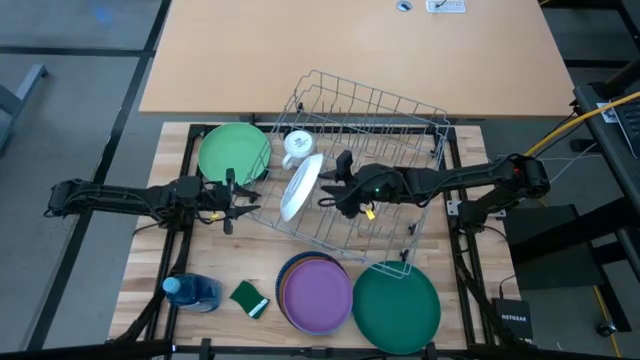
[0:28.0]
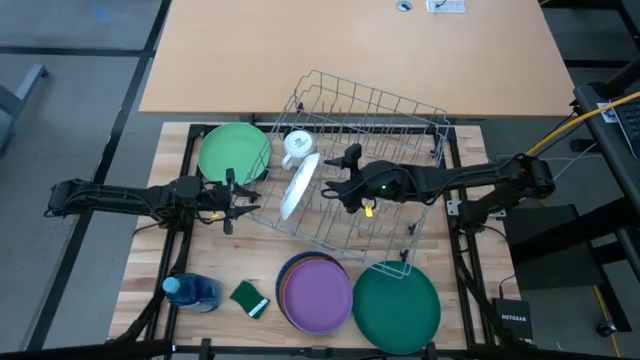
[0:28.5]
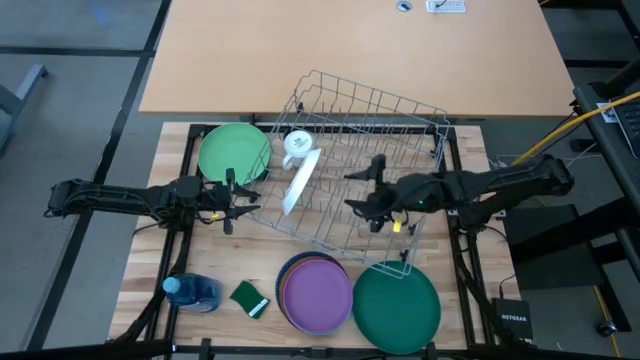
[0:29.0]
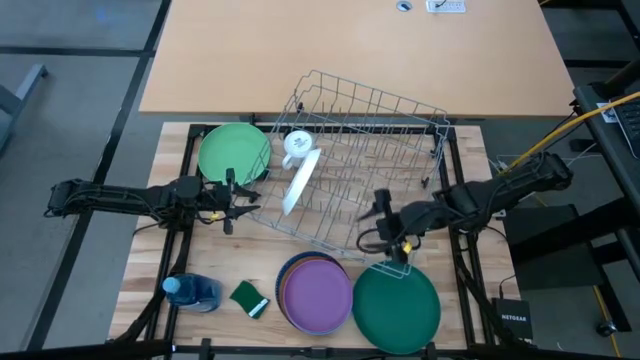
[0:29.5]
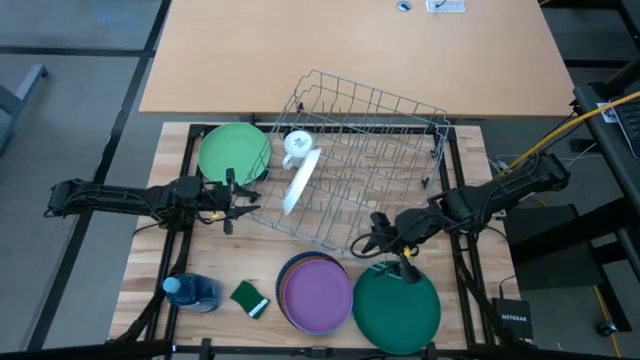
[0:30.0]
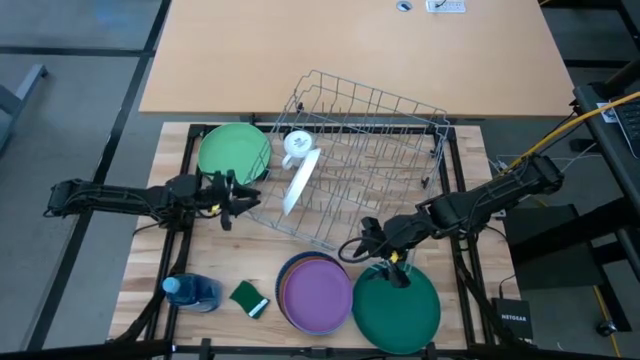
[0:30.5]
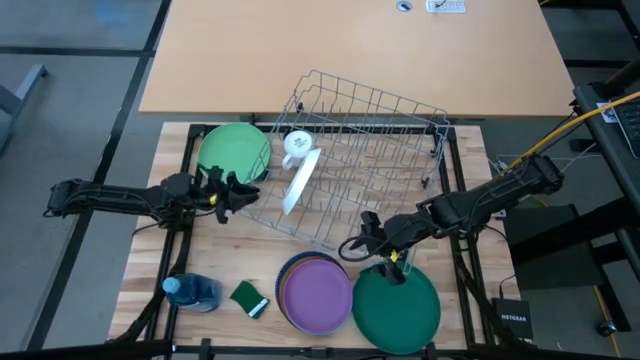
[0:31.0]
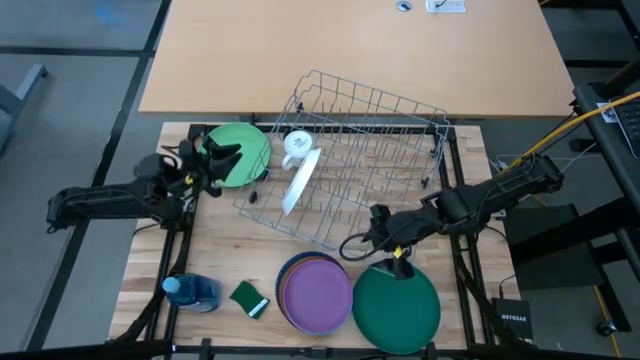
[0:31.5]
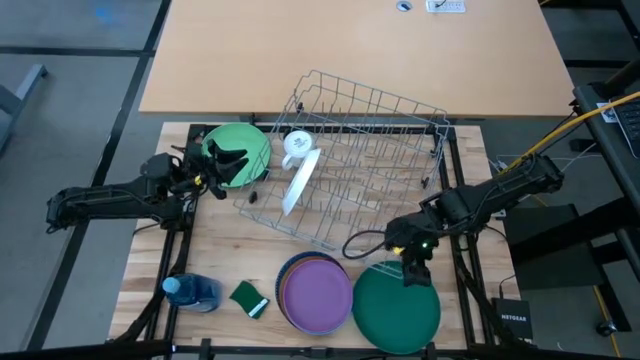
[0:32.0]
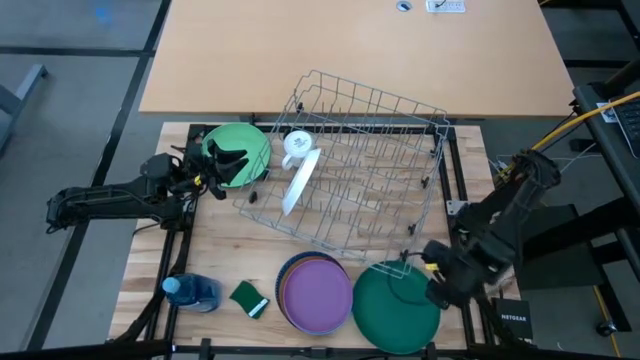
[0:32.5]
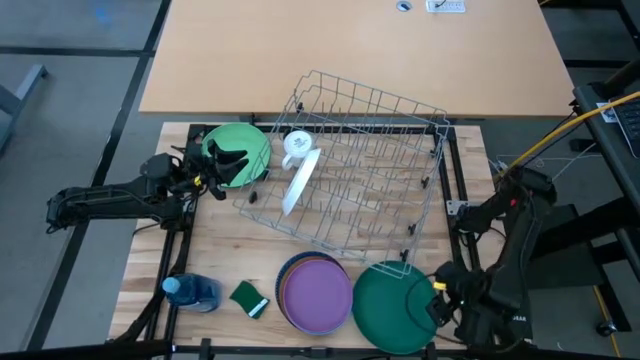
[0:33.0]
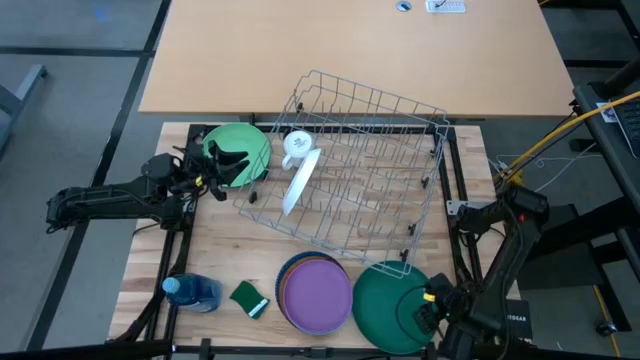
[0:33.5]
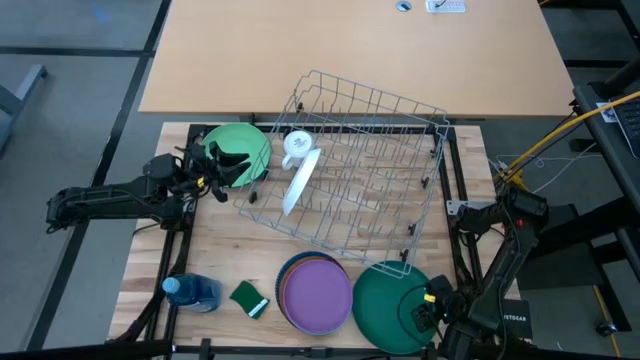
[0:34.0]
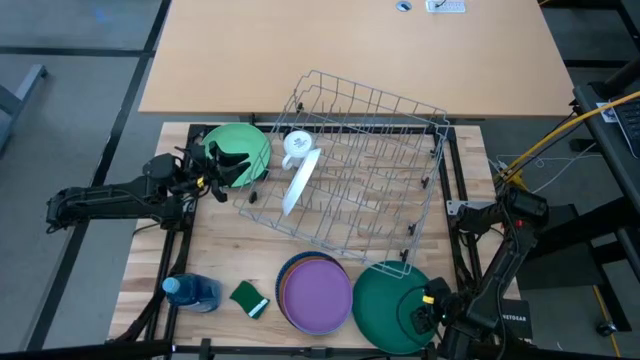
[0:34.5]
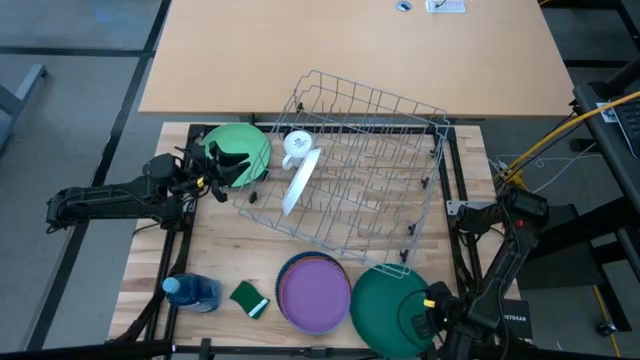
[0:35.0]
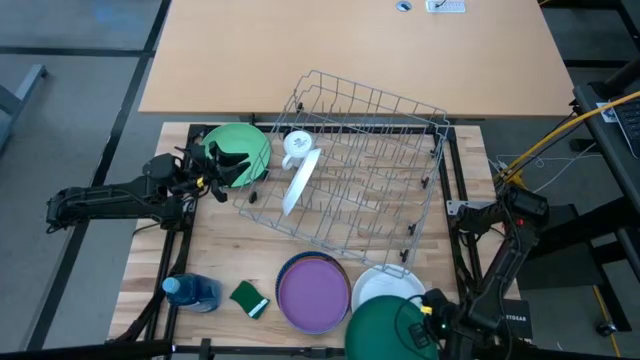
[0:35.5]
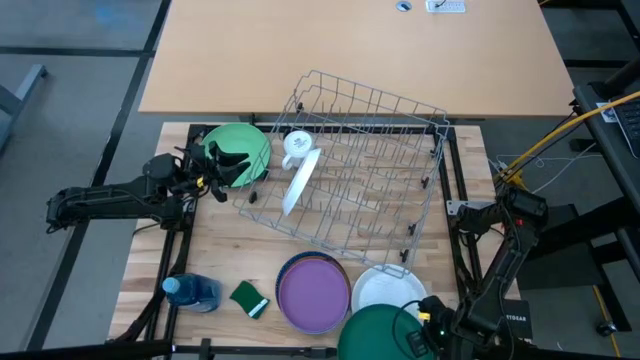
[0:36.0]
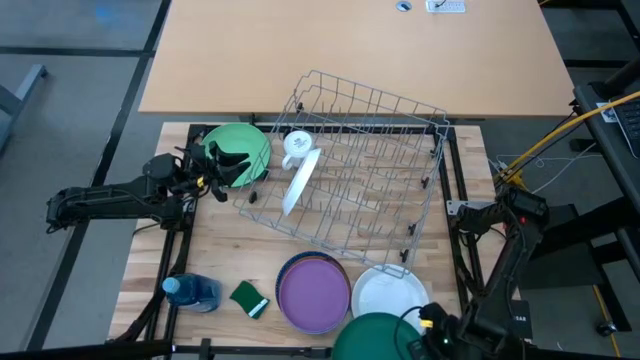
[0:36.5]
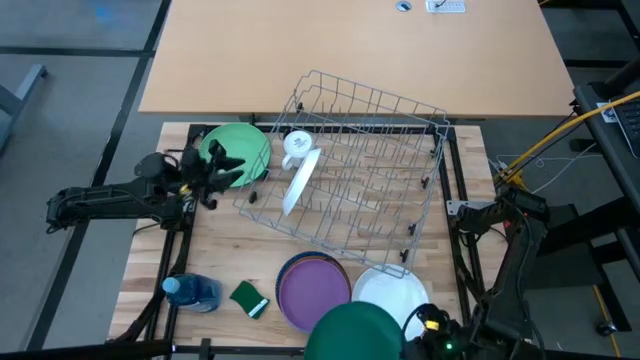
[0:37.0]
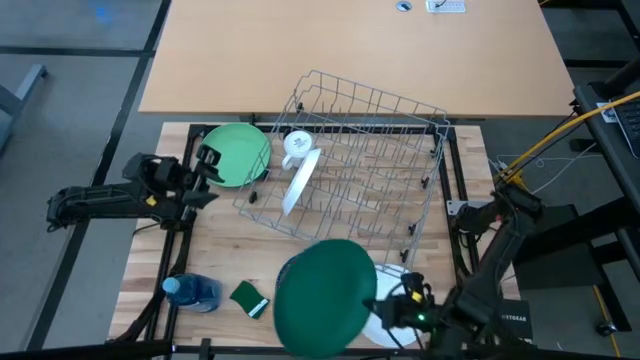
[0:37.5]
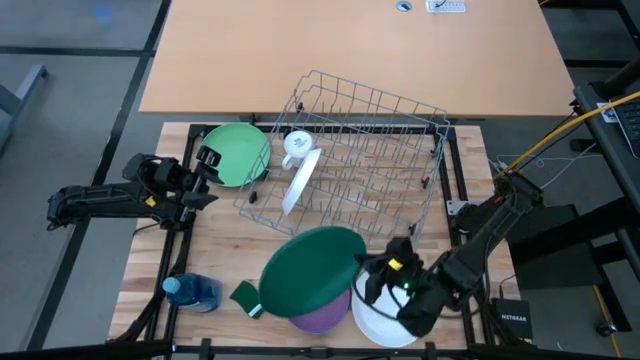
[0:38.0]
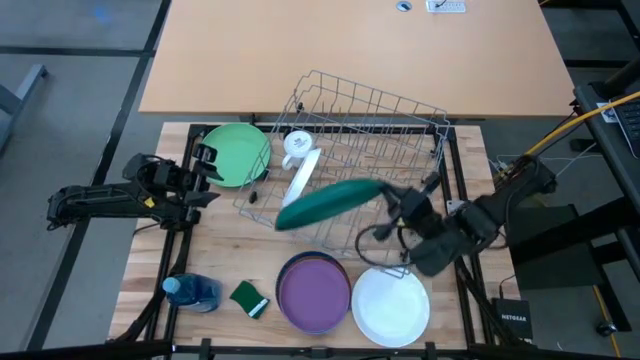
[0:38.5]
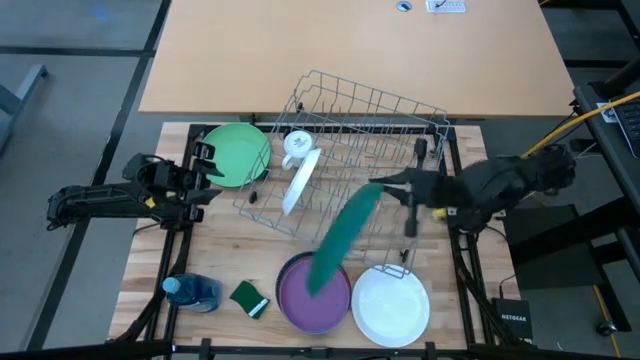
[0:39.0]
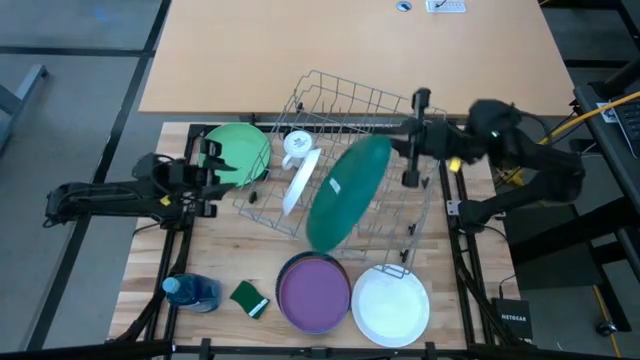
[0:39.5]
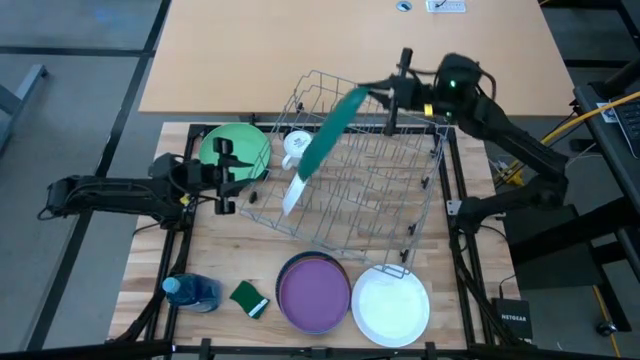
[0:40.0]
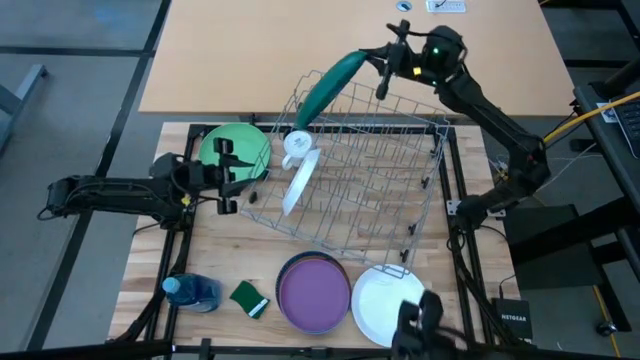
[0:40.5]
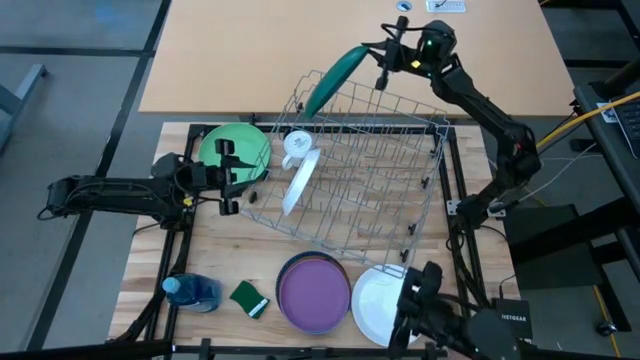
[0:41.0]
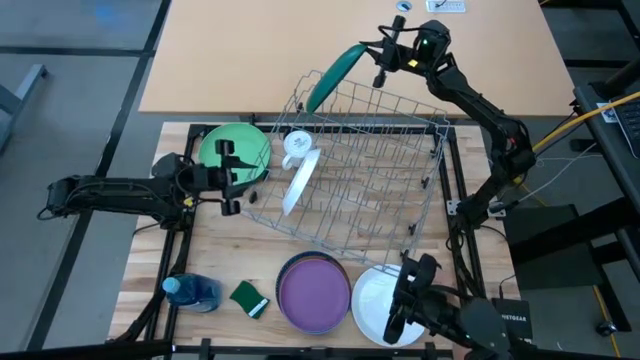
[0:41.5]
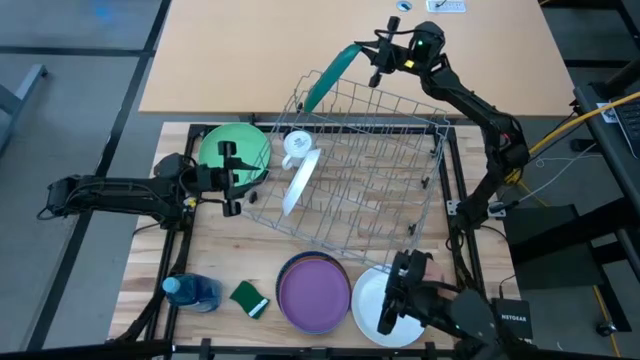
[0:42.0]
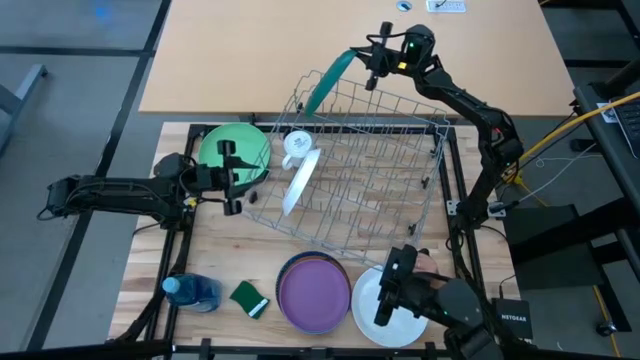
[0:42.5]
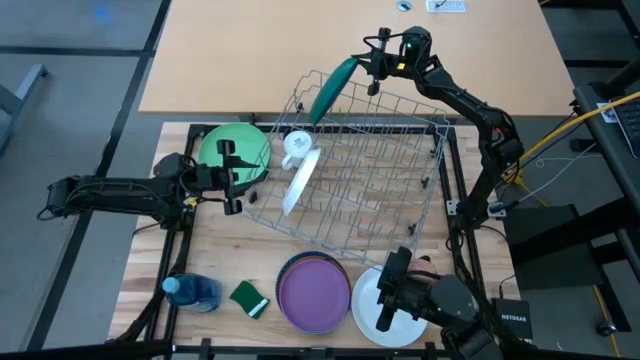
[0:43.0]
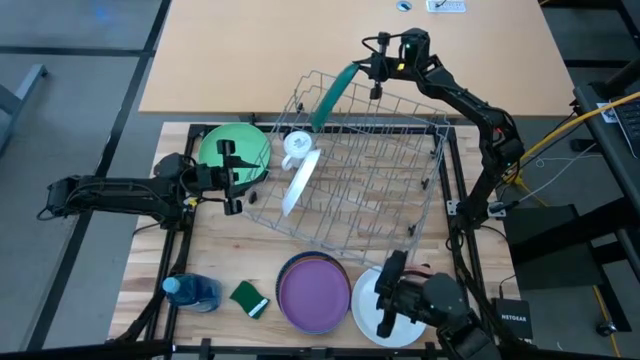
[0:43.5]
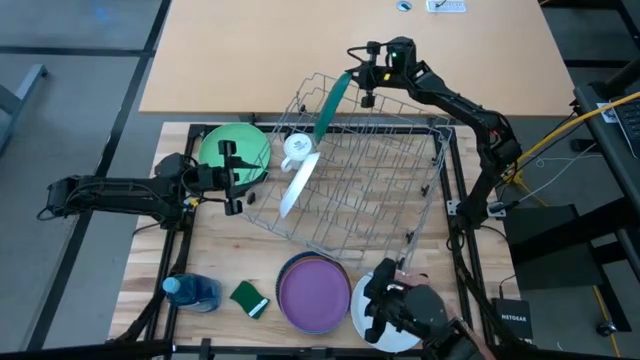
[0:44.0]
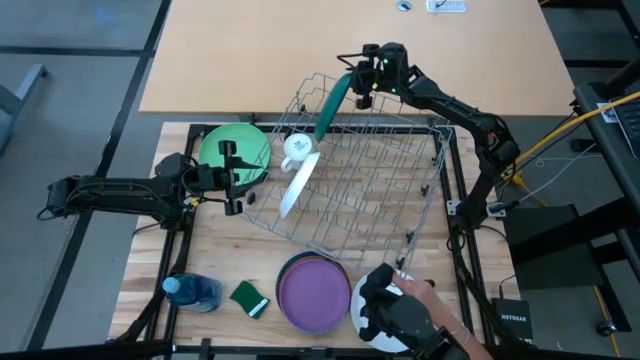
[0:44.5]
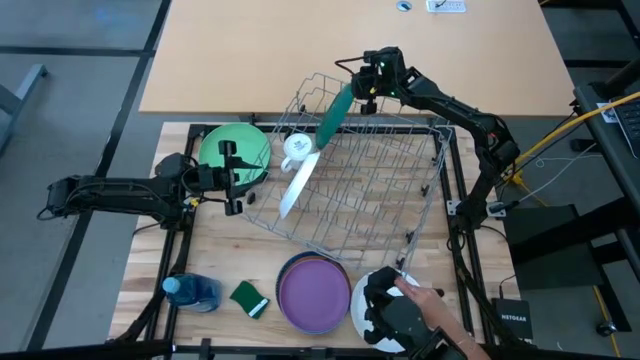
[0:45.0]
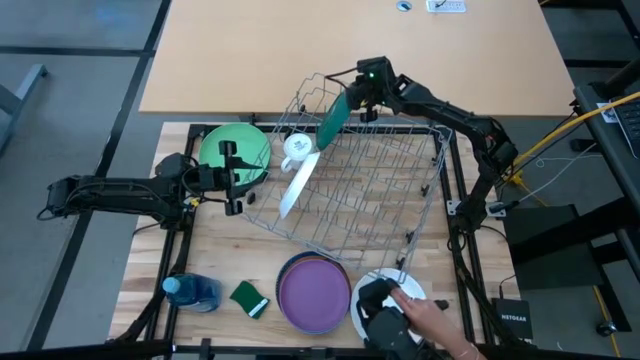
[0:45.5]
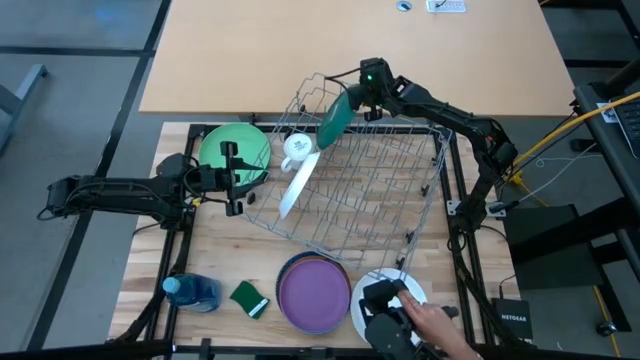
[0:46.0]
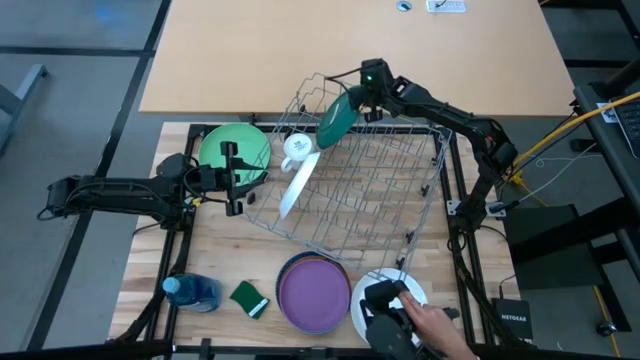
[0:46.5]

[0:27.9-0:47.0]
Task: Sort dishes
Put the dark green plate in the dish rack
